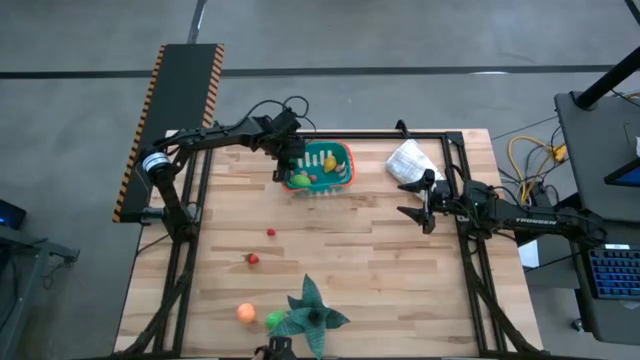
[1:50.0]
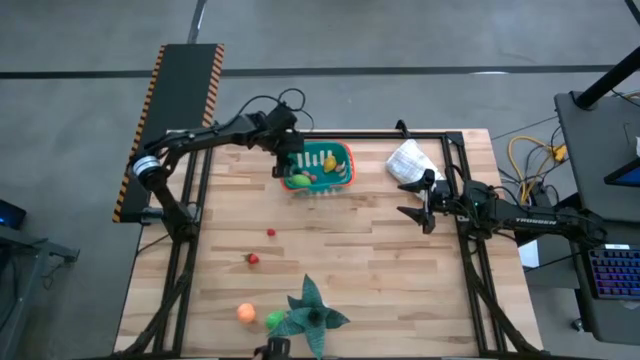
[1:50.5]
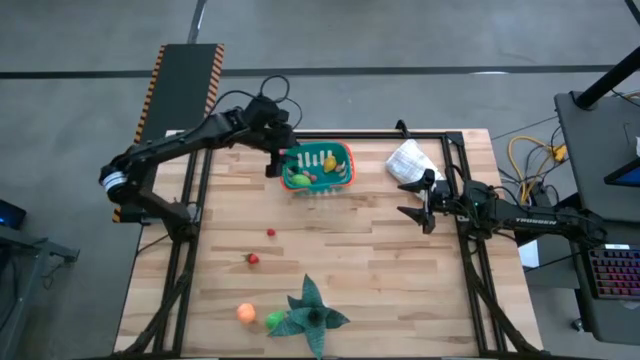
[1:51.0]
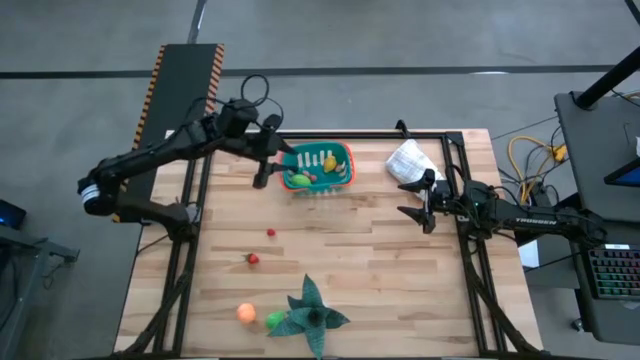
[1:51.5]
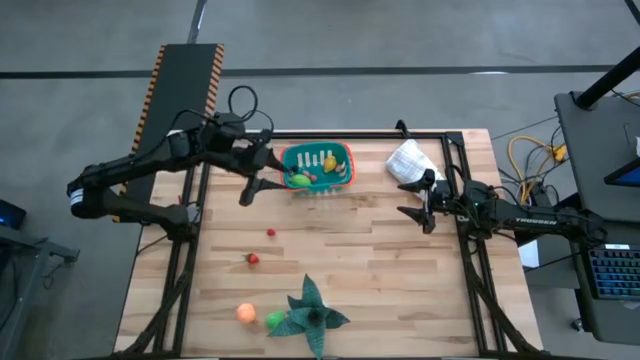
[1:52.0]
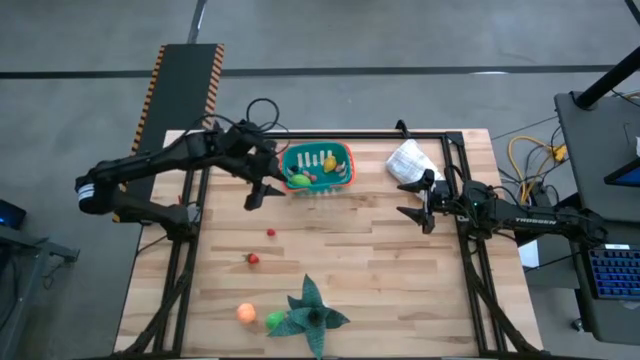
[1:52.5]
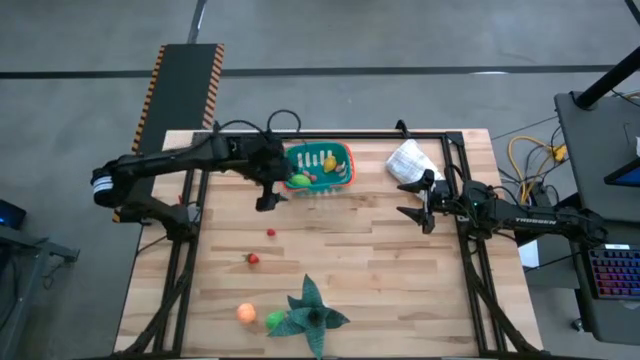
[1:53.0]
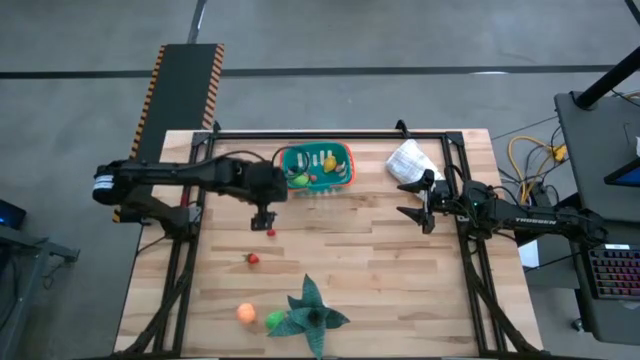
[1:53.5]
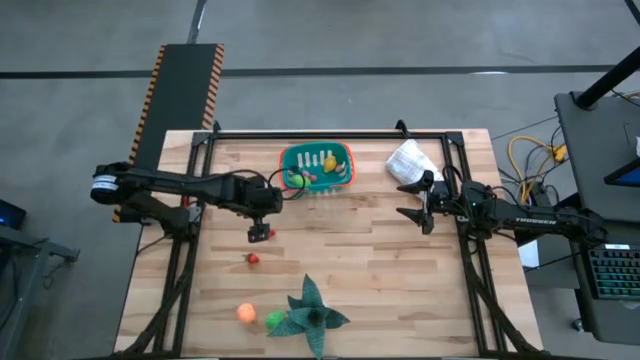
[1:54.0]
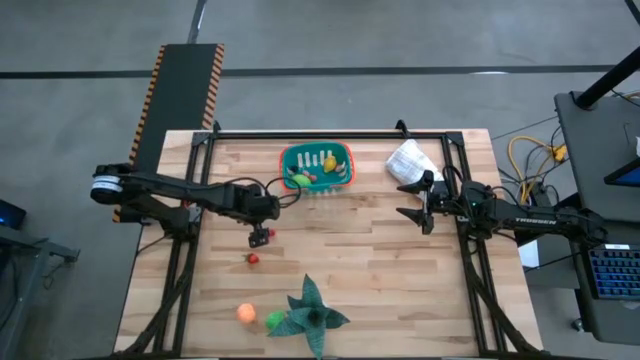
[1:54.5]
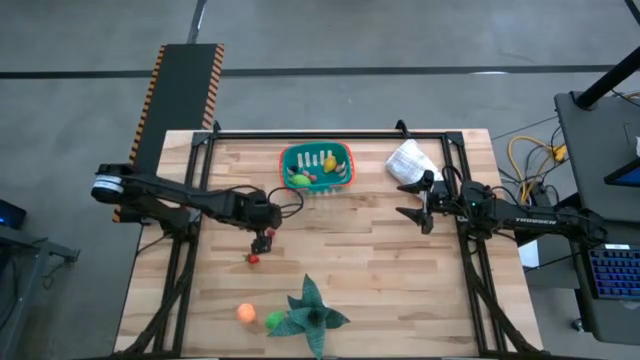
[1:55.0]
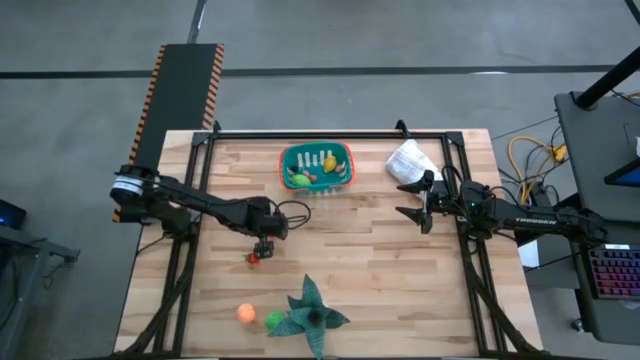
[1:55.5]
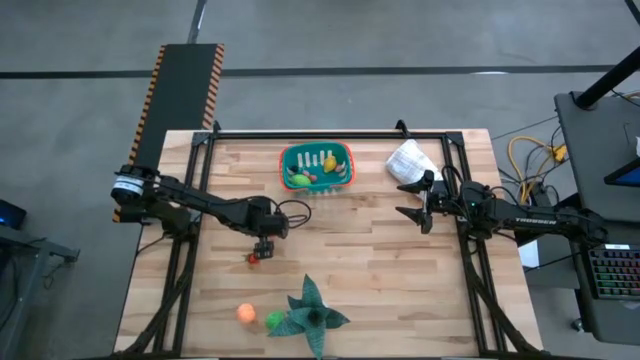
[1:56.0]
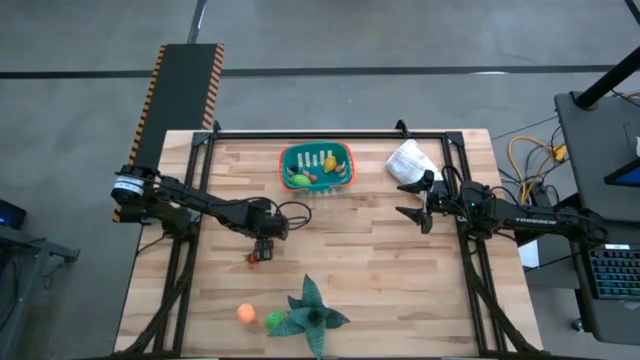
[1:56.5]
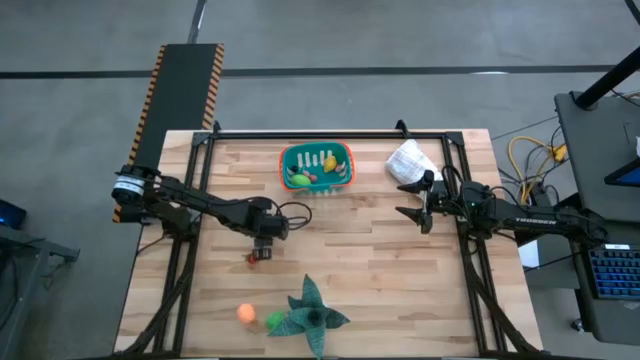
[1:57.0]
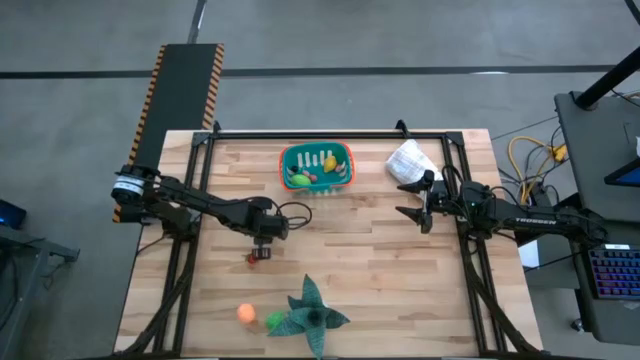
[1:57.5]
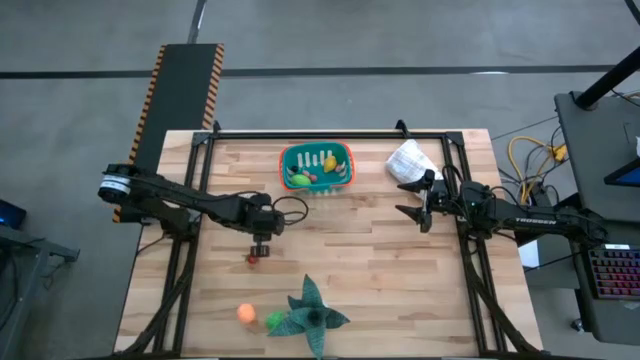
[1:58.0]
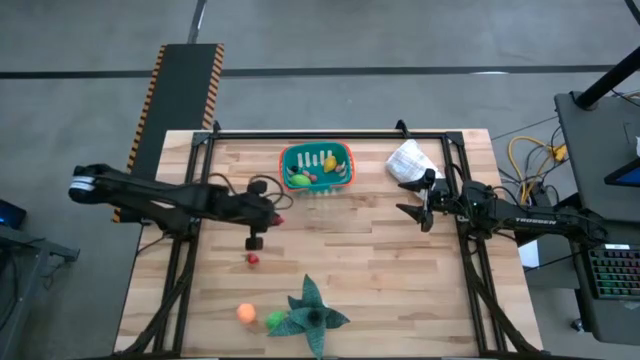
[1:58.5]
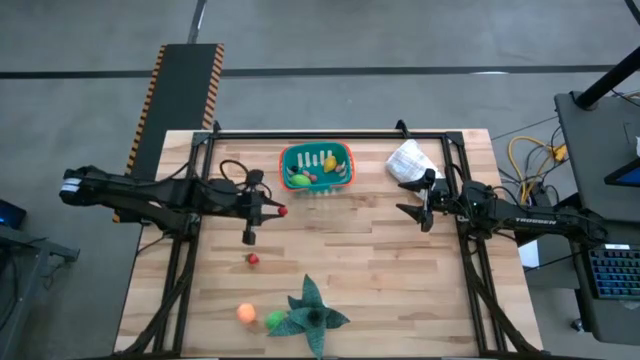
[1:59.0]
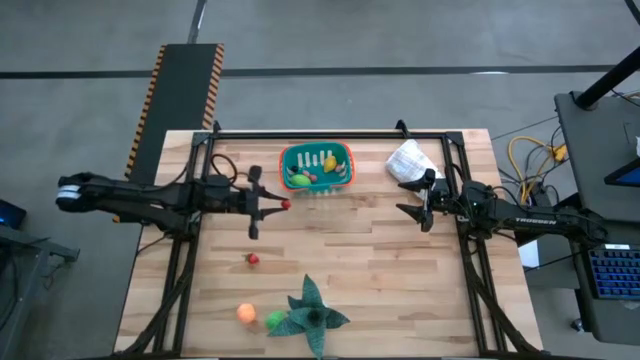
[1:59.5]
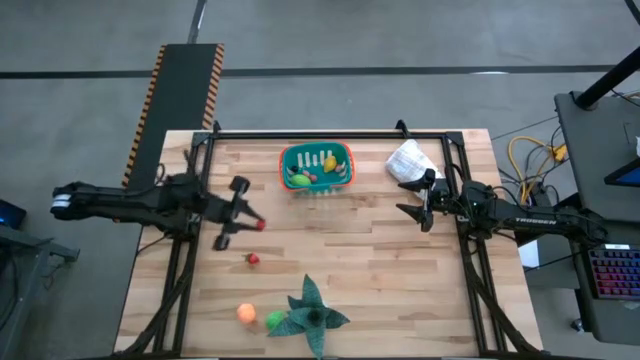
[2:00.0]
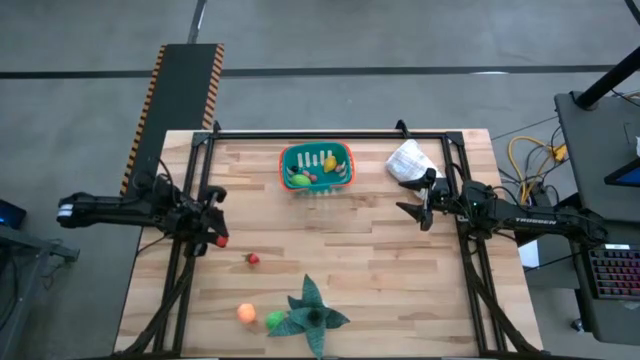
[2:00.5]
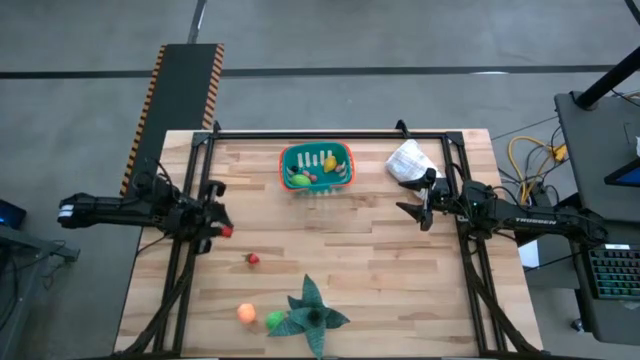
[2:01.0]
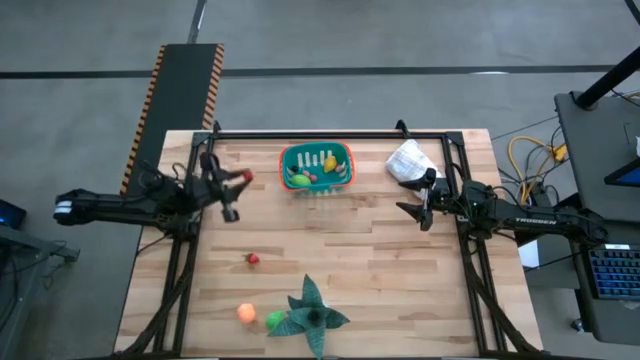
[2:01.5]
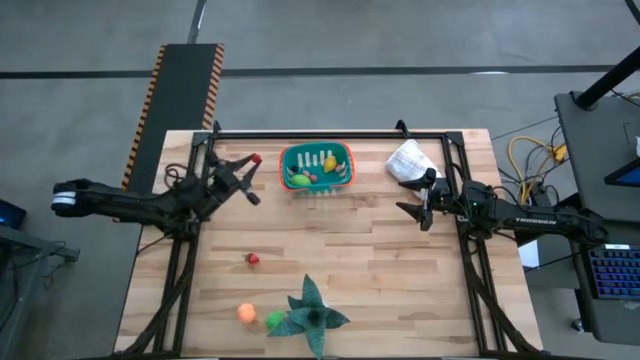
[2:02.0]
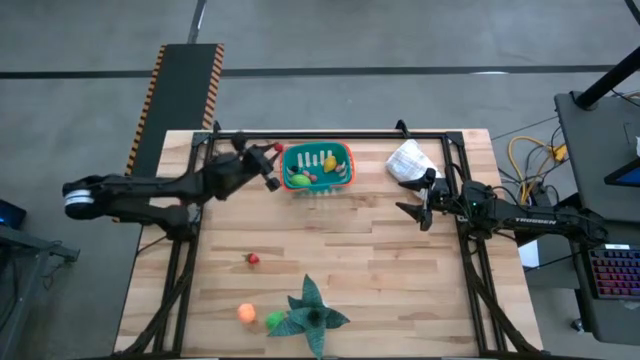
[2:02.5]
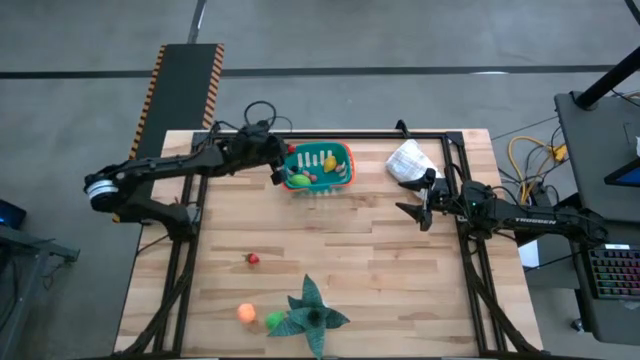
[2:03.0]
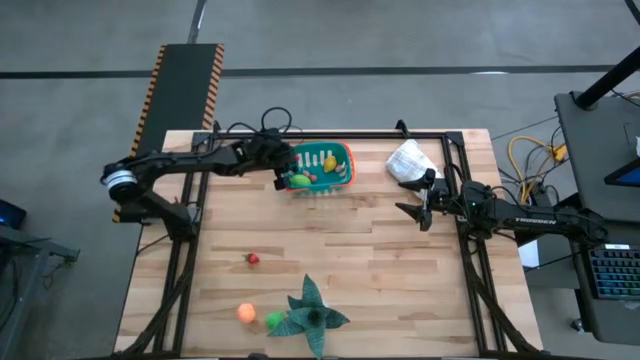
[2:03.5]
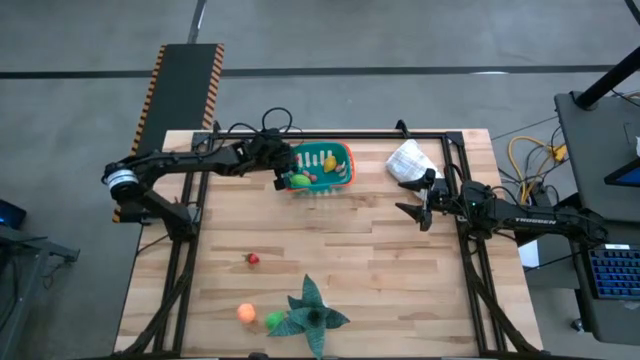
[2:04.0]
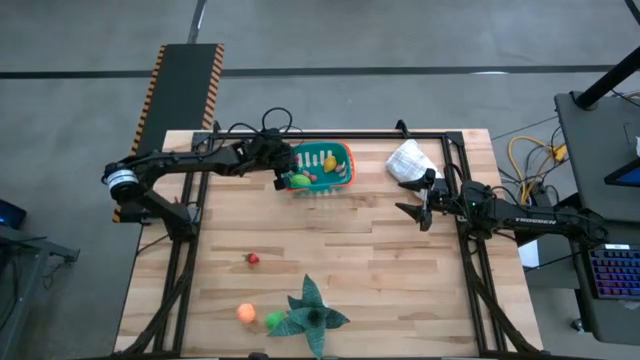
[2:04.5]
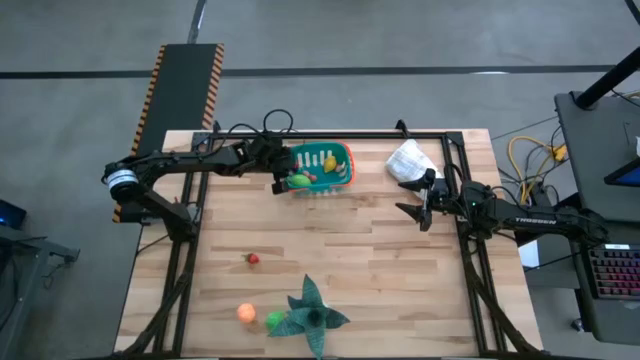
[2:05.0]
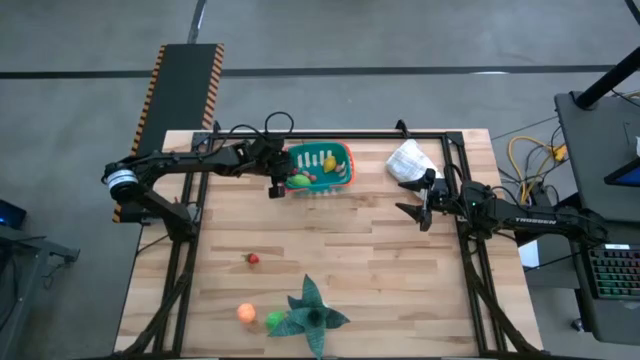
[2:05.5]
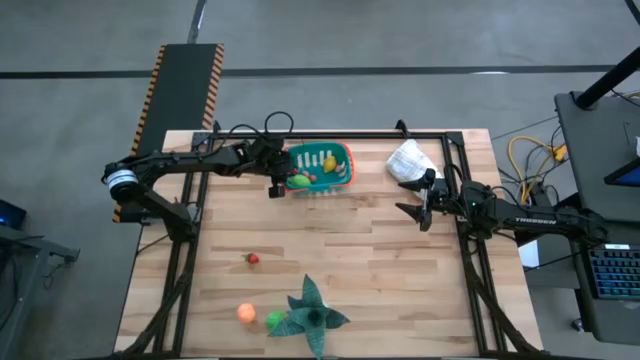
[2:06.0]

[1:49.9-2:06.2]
Task: Pick and placing Produce into tupperware
Put the red raspberry toy into the bin

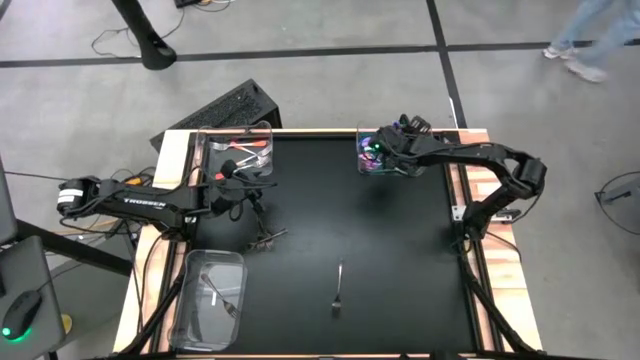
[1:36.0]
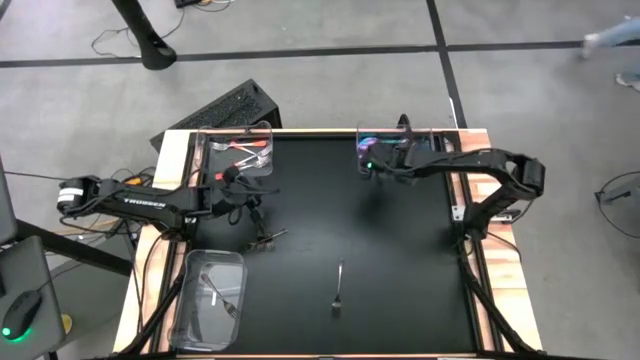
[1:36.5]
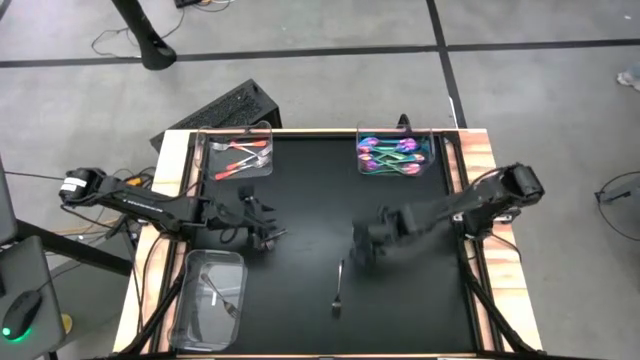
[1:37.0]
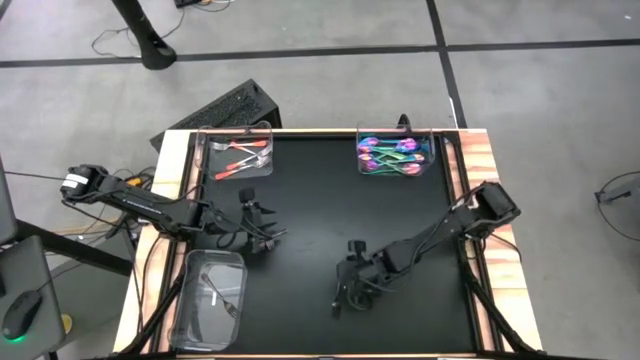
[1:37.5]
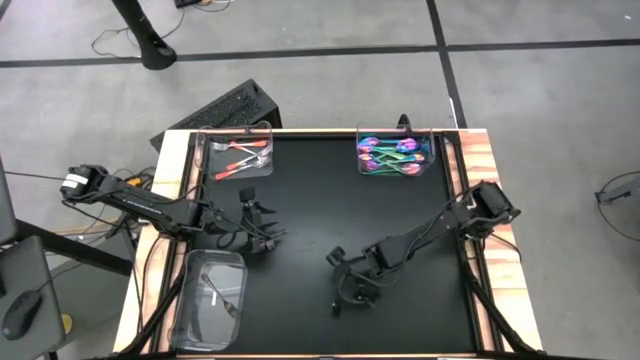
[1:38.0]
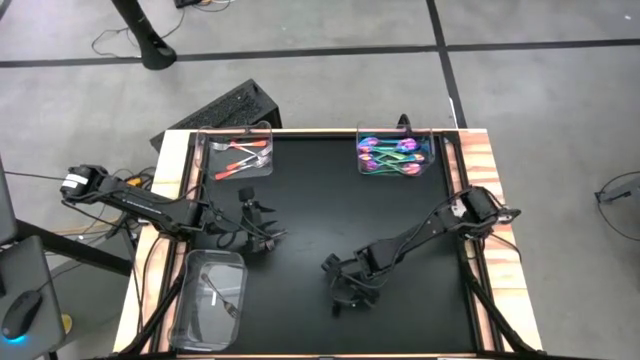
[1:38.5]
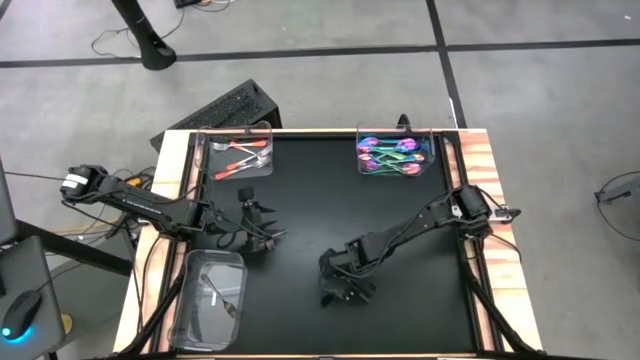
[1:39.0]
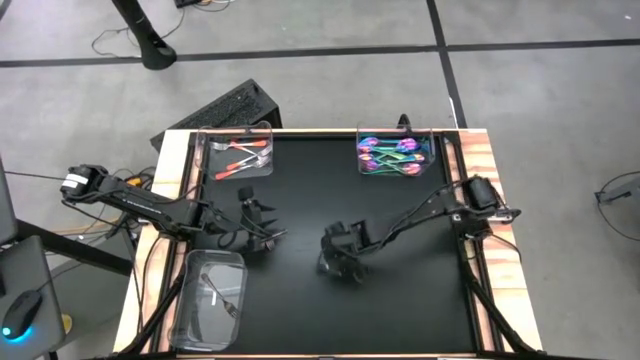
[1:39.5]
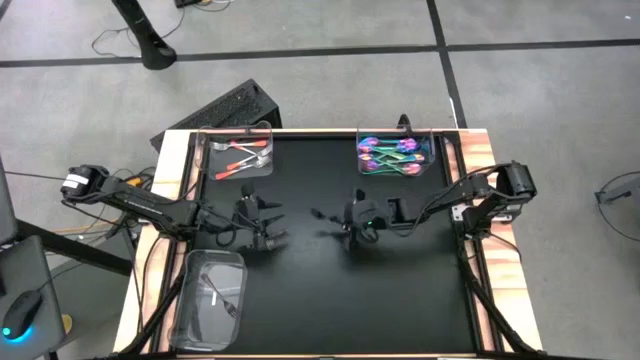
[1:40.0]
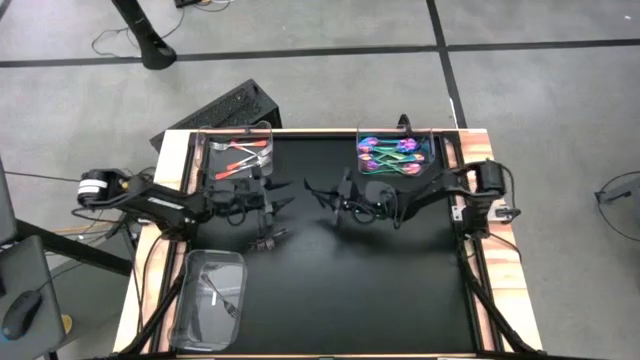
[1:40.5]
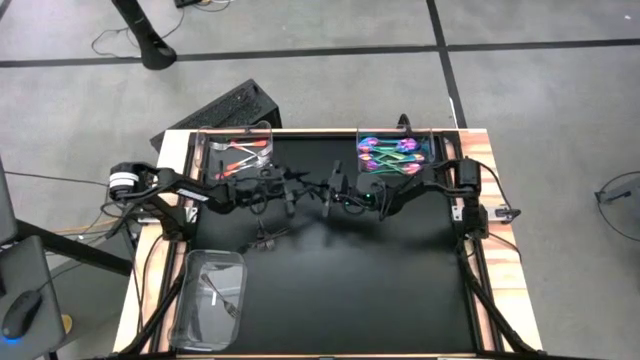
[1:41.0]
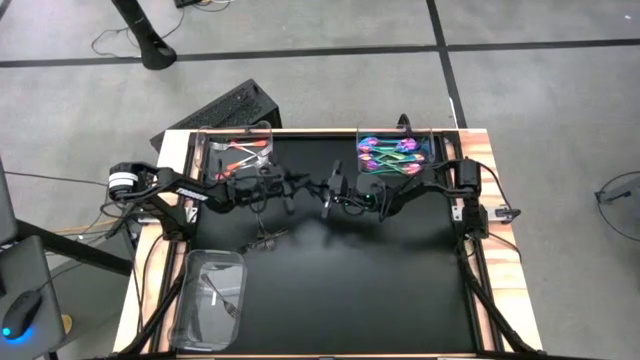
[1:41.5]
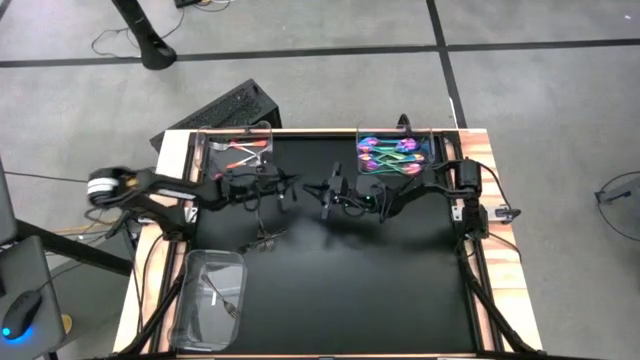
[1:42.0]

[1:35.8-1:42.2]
Task: Sort silverware by color (type)
Put the black fork into bottom transparent bin
